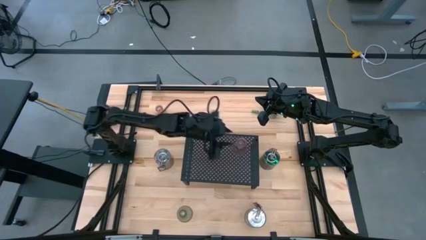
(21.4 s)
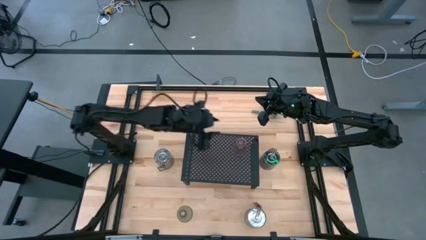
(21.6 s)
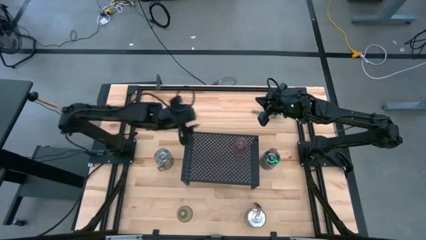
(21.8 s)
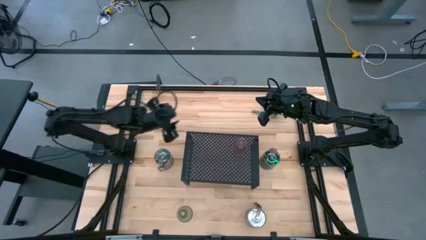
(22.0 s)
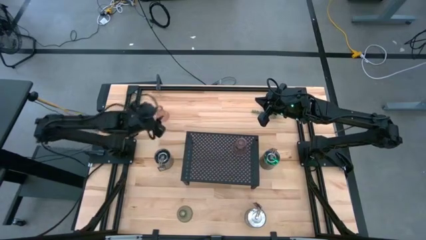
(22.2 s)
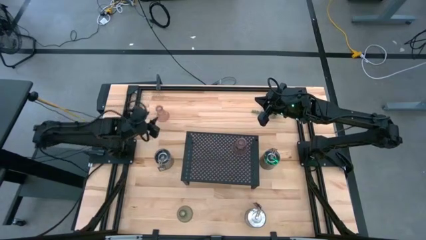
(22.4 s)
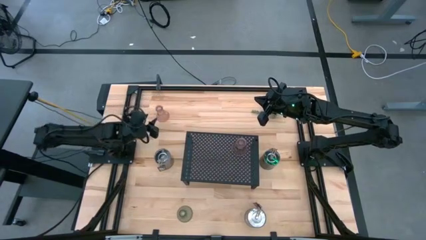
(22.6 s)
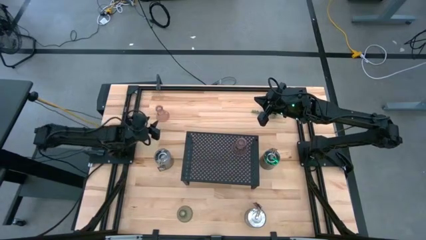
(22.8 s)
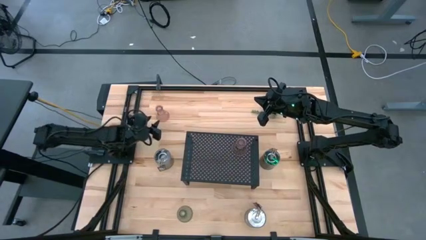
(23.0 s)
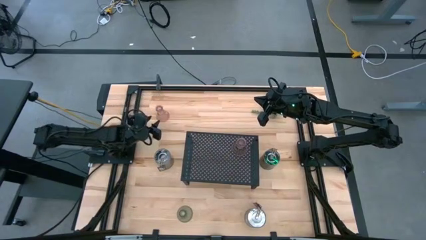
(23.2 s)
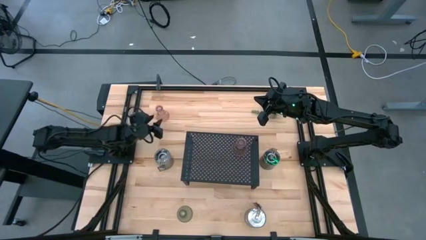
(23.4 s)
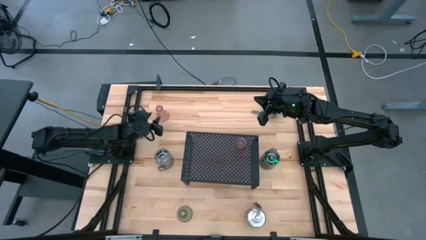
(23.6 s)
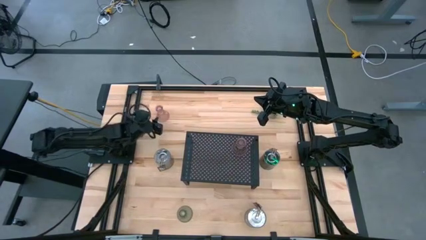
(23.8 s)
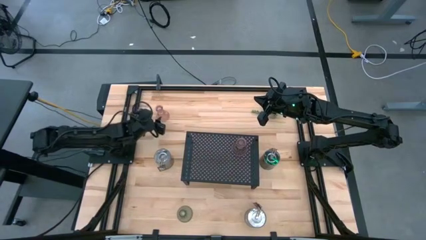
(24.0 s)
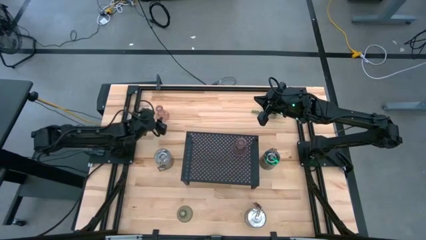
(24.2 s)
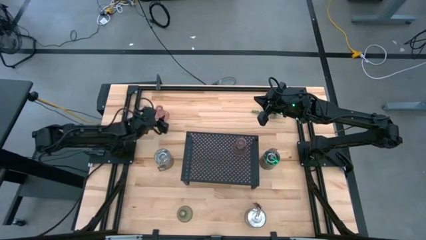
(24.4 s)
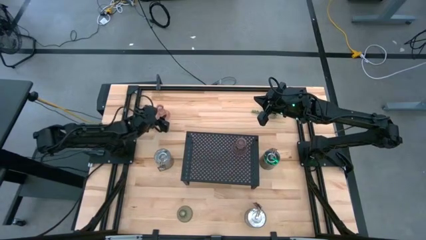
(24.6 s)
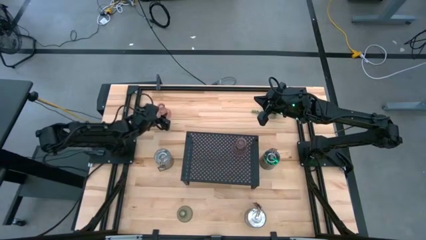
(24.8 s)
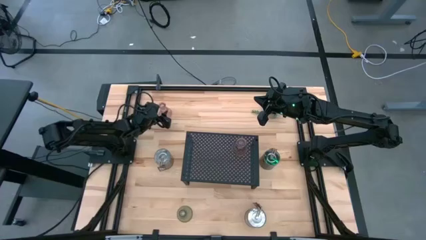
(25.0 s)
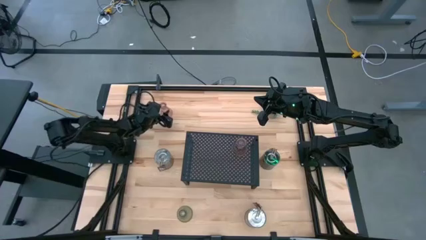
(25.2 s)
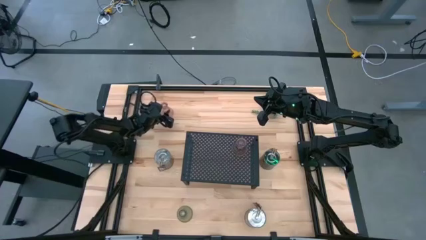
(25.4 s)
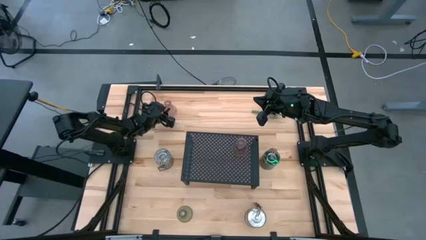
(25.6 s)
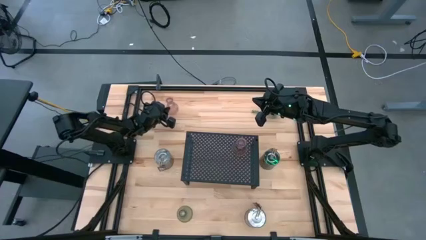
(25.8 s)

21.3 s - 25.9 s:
Task: Pick & Place candle stick holders
Put the pink candle holder on the shelf

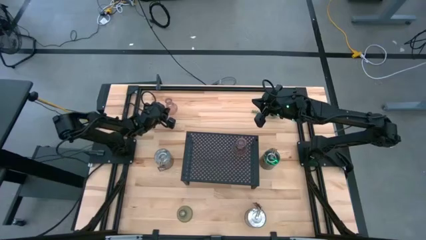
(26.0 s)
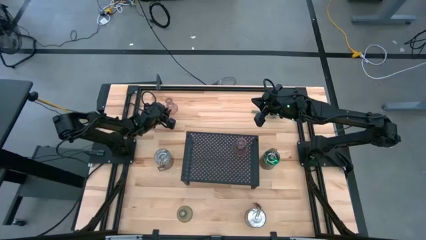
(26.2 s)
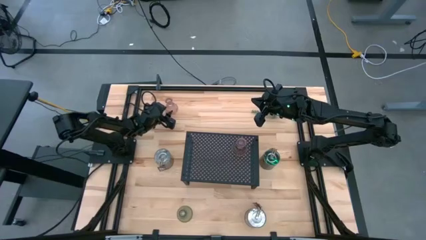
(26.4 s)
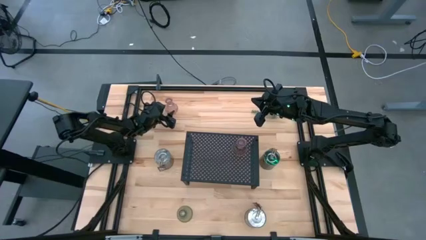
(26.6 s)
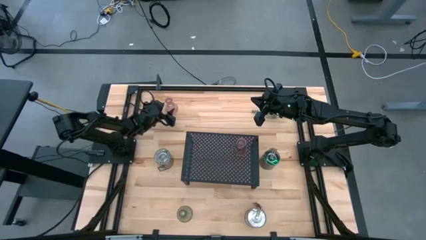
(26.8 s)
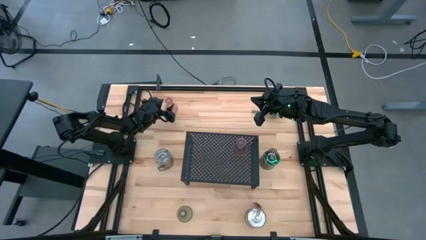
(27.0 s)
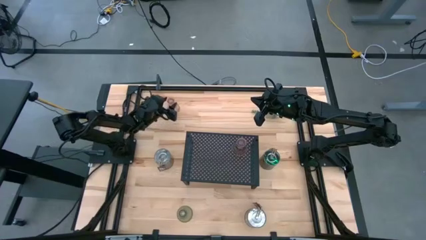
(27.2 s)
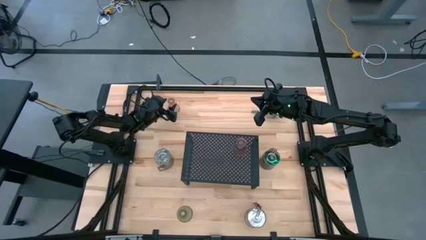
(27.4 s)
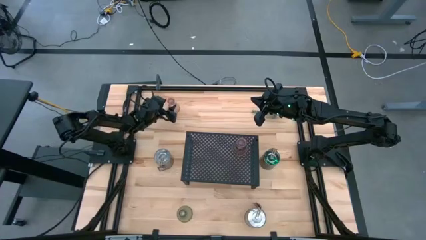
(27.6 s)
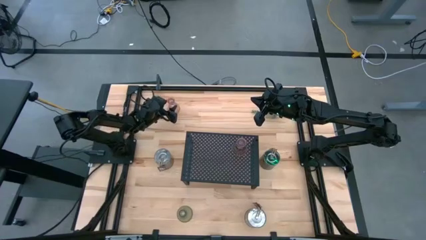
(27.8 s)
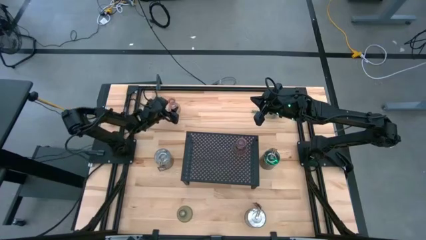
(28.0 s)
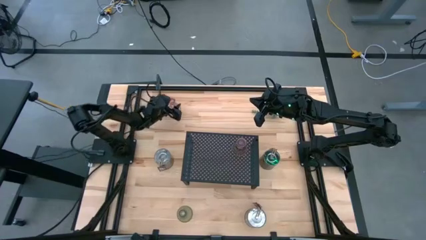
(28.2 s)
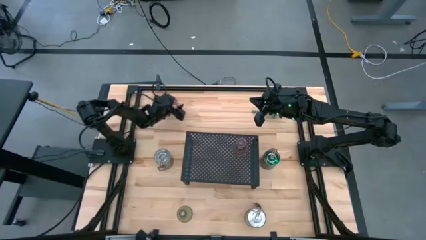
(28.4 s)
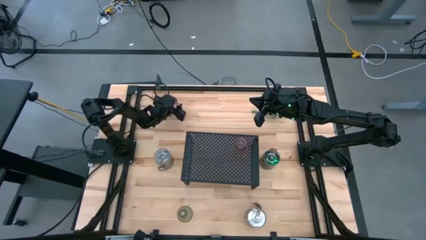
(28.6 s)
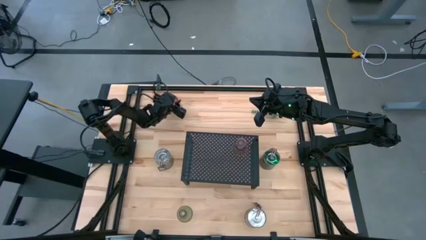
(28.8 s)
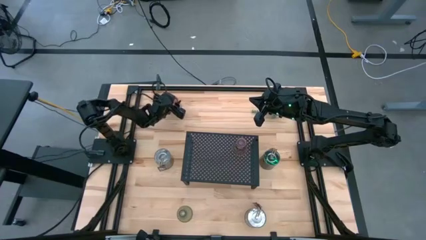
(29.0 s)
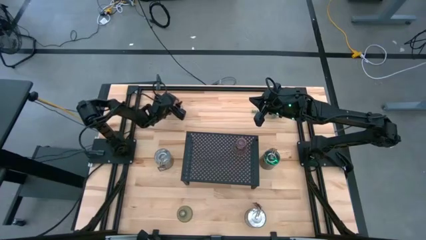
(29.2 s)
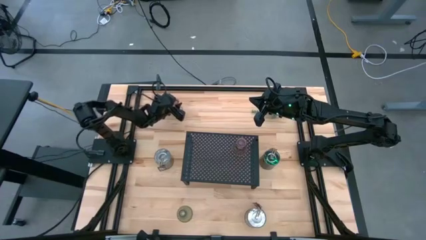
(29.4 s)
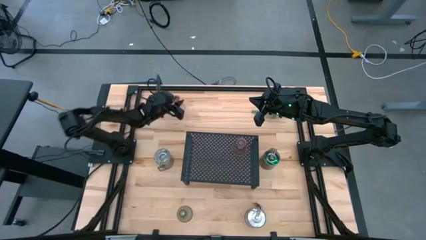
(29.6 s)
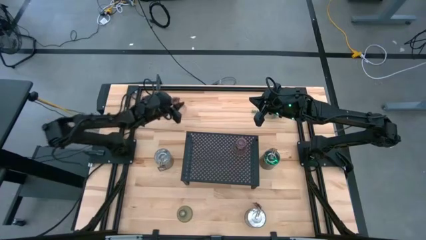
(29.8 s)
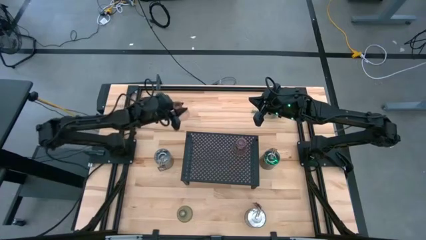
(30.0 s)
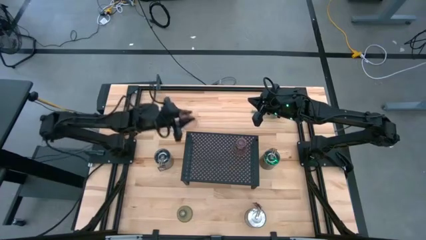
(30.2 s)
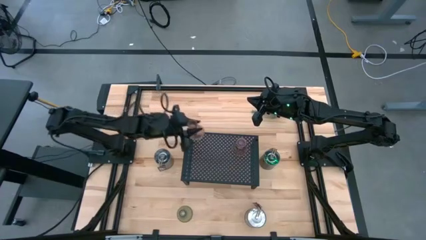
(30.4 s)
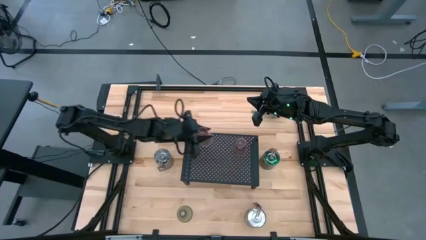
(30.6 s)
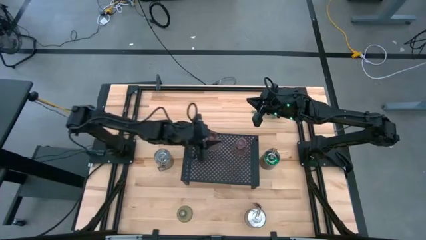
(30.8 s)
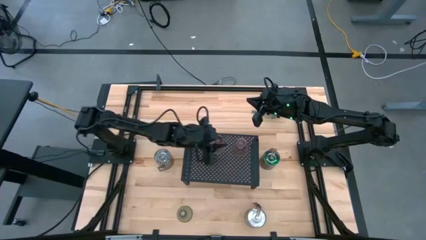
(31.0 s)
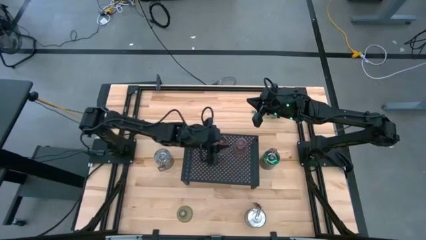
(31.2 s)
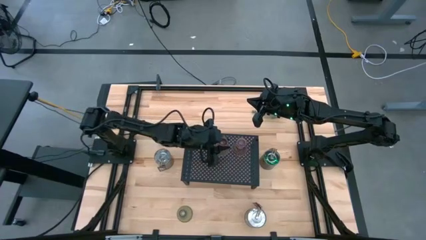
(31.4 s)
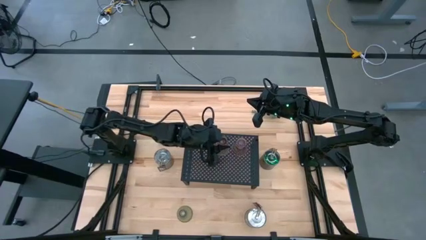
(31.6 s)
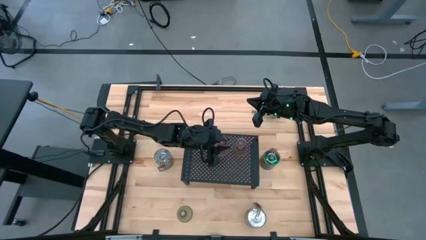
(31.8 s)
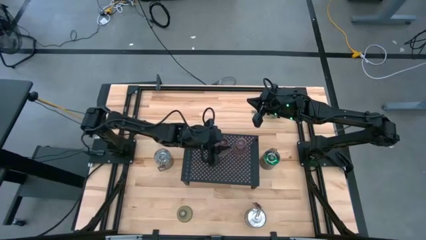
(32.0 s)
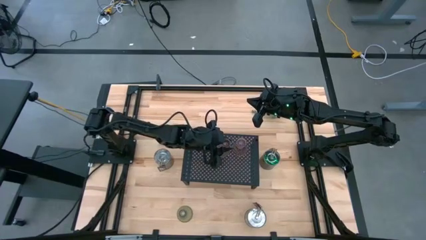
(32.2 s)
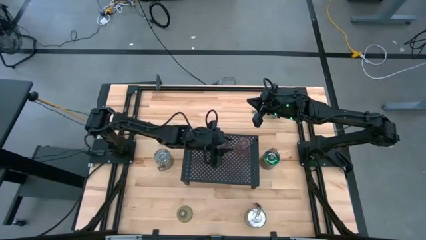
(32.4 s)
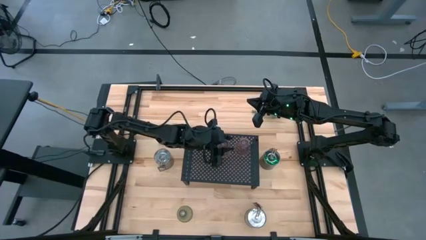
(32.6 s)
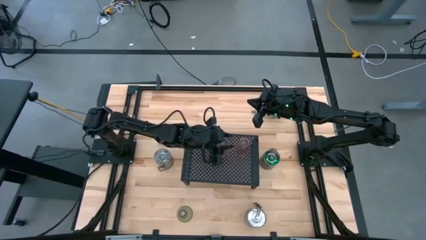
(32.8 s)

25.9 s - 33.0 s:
Put the pink candle holder on the shelf

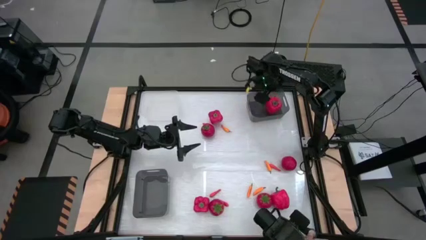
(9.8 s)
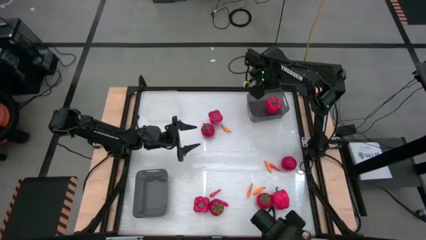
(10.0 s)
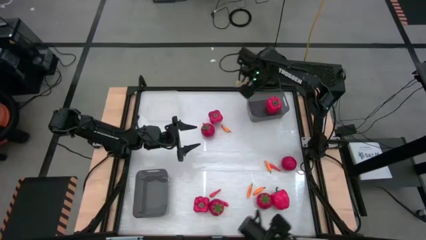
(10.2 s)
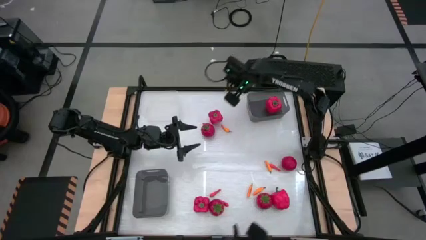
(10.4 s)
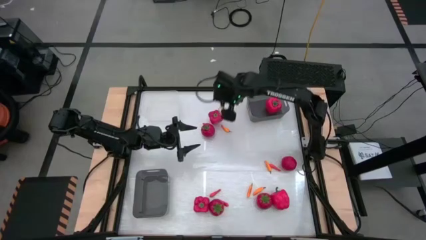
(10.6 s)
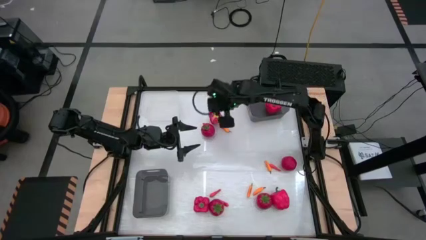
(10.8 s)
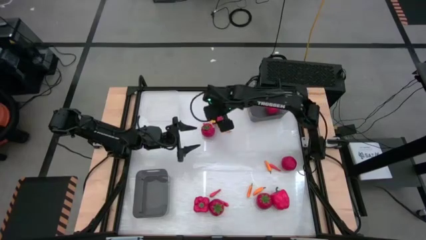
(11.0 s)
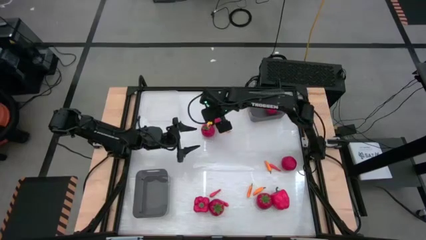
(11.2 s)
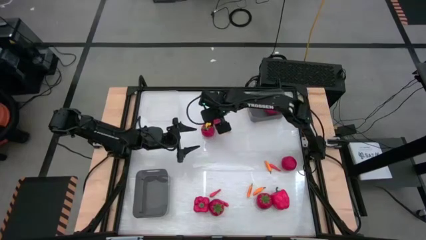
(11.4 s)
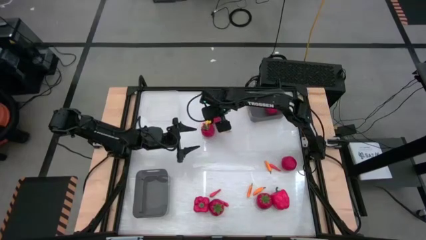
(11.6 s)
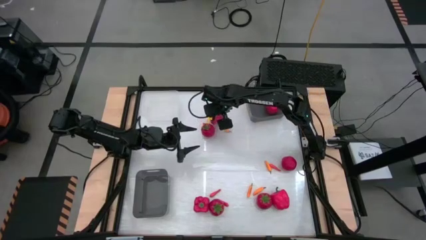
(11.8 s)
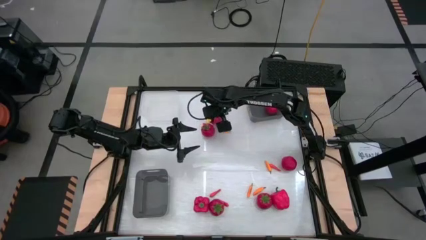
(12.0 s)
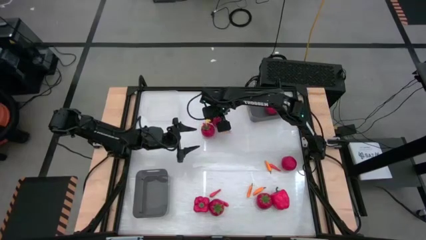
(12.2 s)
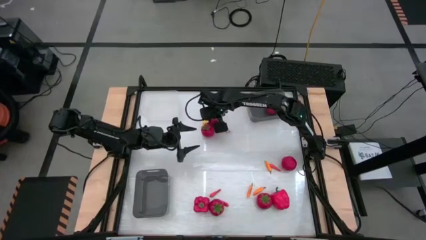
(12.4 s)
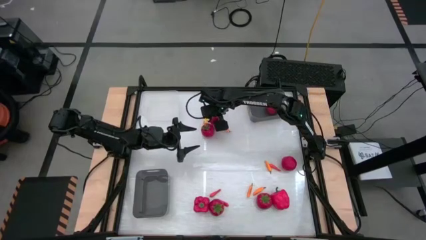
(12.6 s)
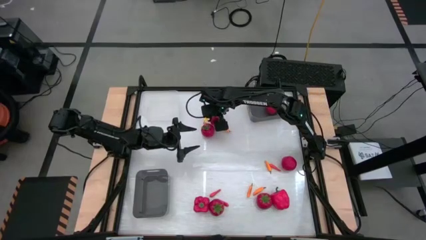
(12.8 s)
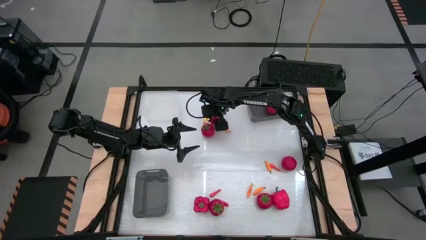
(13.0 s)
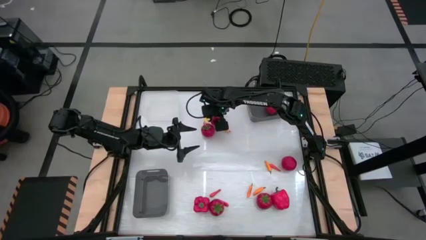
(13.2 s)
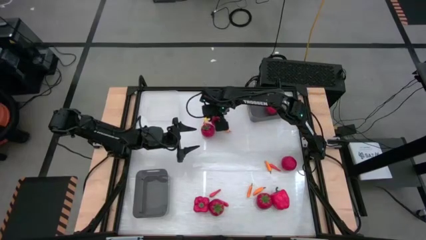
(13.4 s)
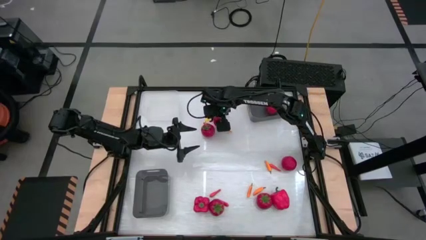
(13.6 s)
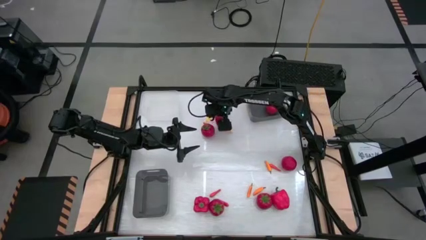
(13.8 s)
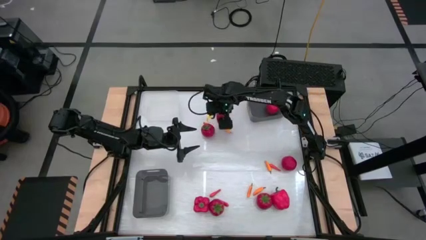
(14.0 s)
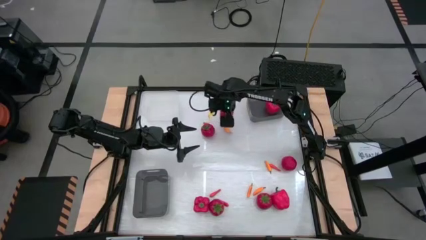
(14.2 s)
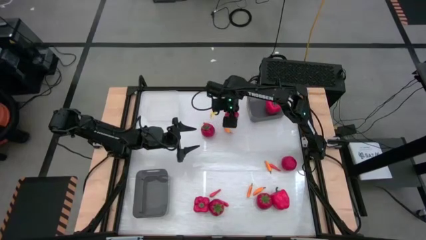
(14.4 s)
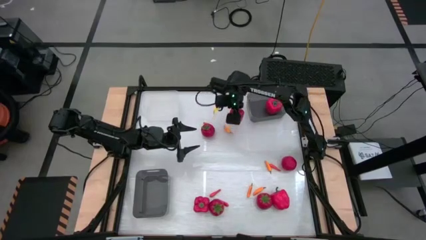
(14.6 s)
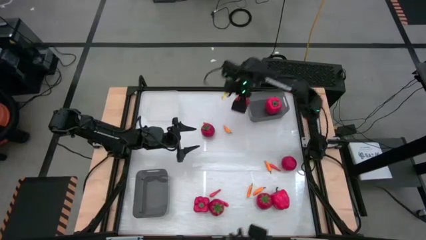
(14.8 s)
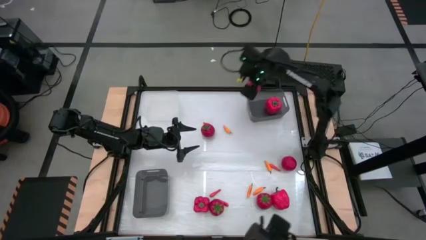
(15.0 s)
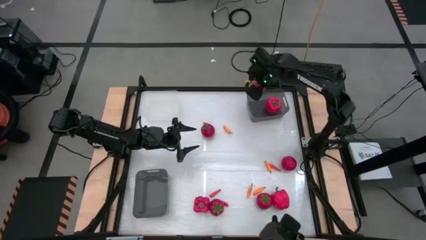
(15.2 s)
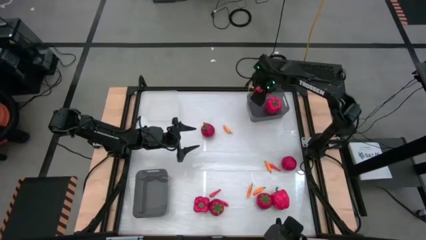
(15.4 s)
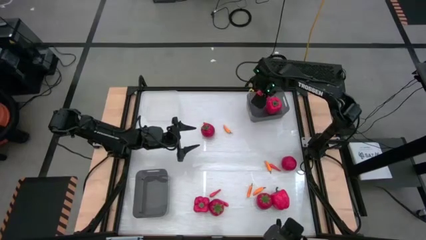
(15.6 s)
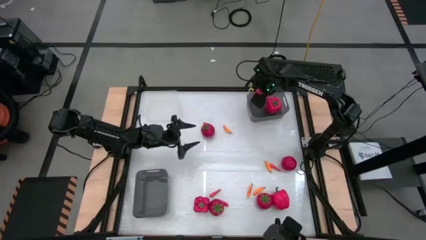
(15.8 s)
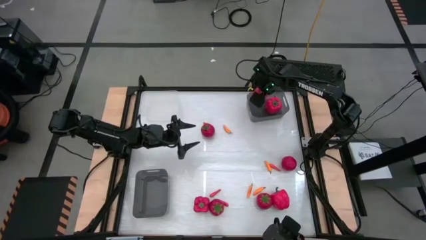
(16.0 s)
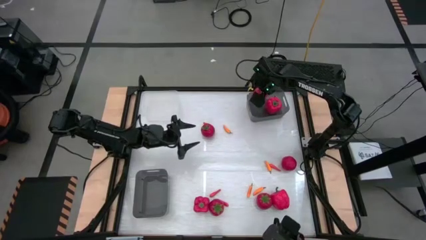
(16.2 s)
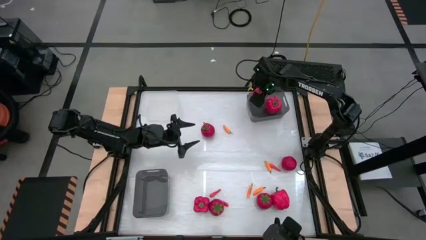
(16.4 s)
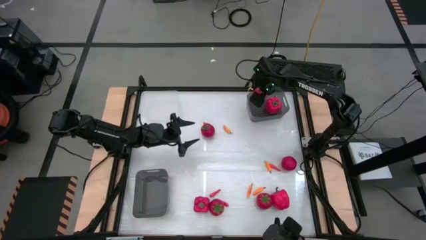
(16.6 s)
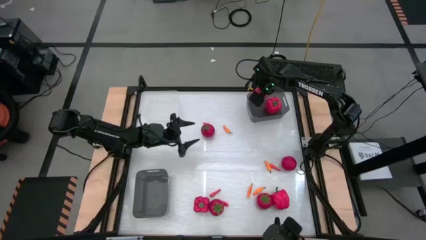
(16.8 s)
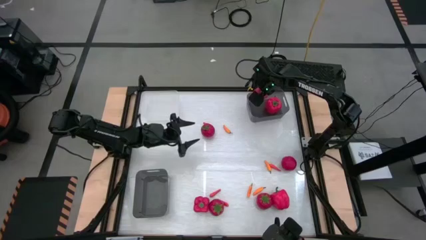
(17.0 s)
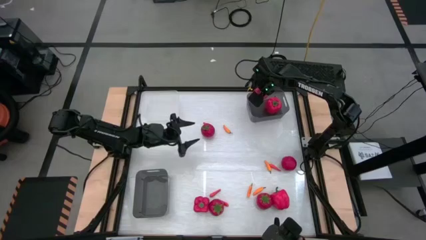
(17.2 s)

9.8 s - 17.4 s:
Task: Sort produce into baskets
Put the red bell pepper into the top black bin
